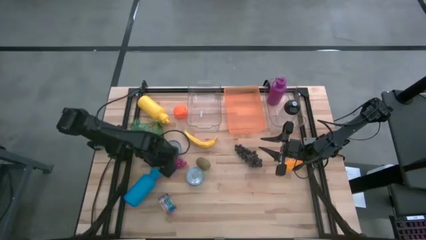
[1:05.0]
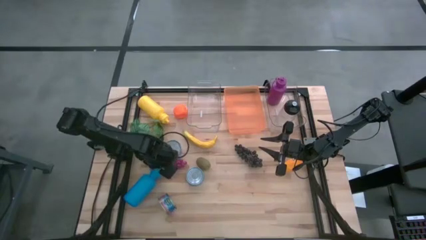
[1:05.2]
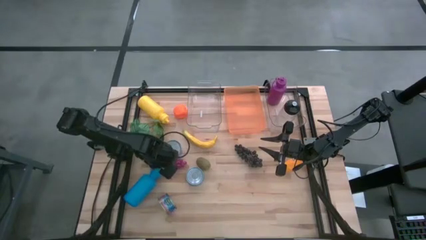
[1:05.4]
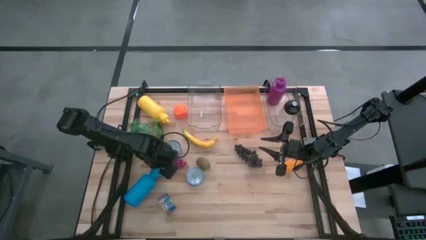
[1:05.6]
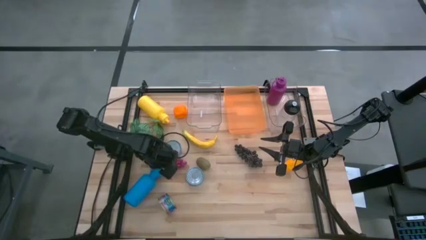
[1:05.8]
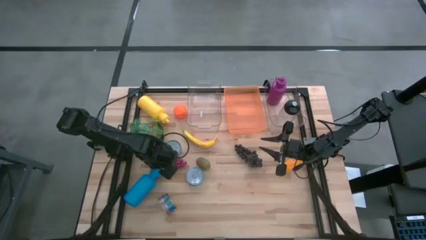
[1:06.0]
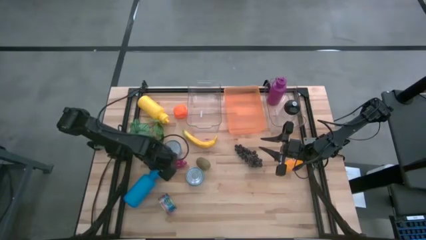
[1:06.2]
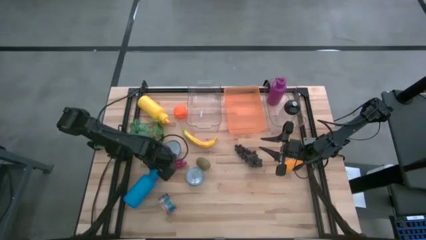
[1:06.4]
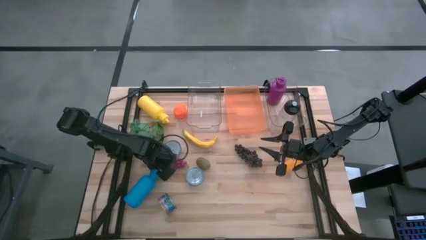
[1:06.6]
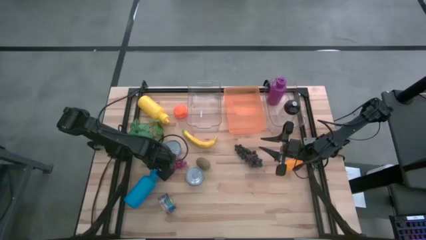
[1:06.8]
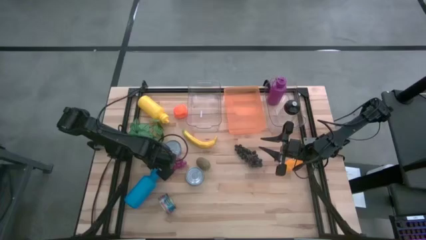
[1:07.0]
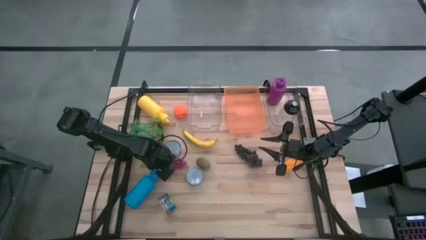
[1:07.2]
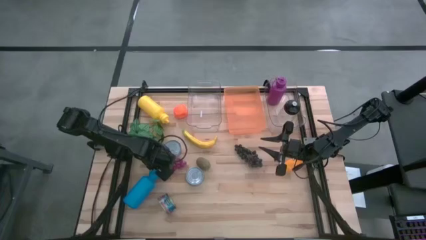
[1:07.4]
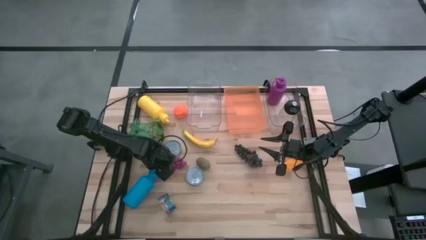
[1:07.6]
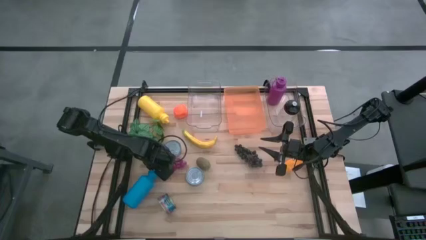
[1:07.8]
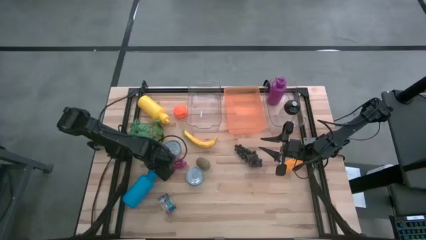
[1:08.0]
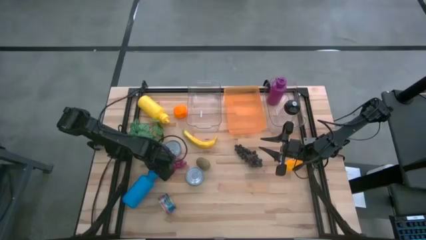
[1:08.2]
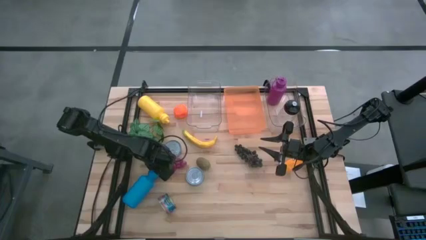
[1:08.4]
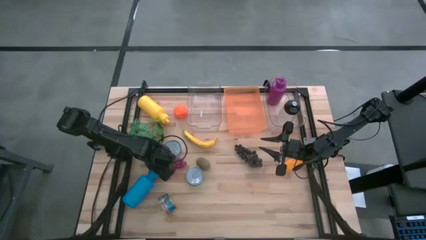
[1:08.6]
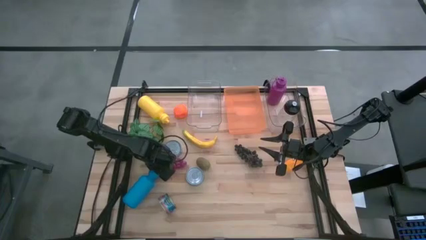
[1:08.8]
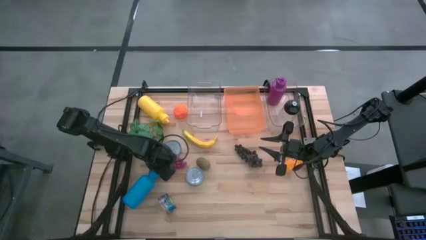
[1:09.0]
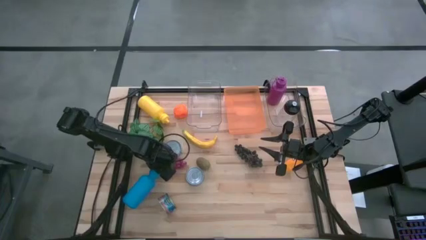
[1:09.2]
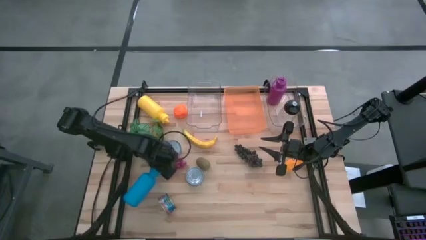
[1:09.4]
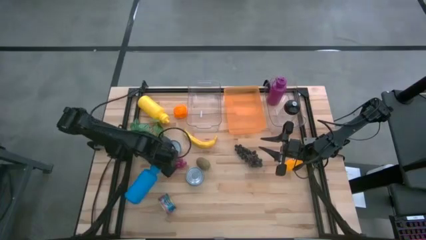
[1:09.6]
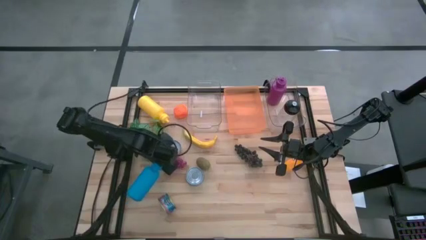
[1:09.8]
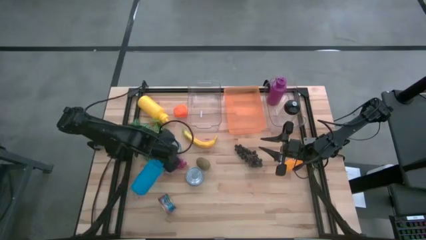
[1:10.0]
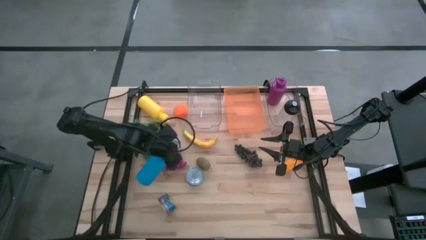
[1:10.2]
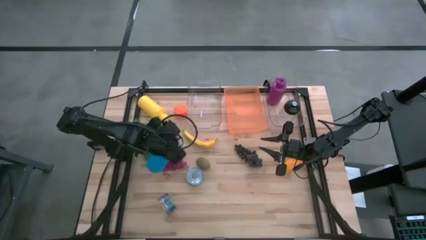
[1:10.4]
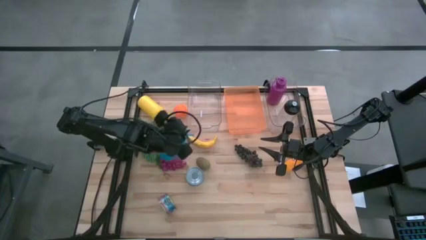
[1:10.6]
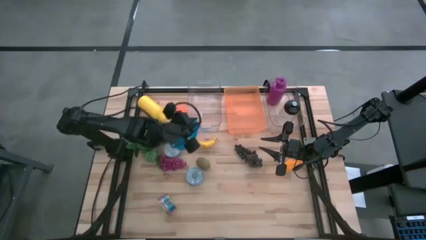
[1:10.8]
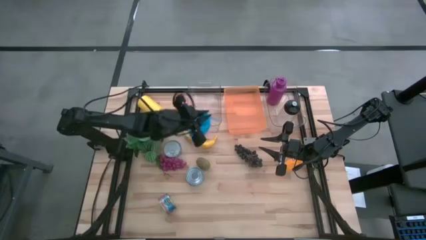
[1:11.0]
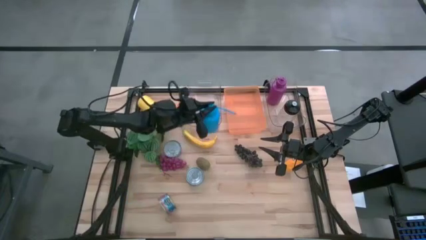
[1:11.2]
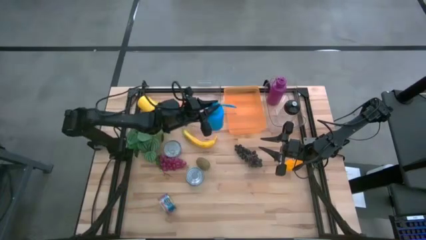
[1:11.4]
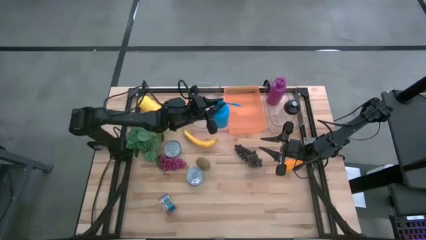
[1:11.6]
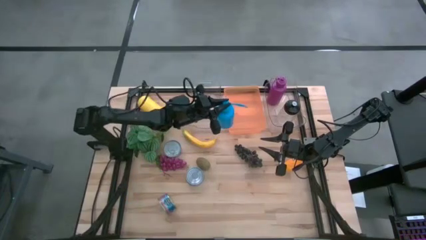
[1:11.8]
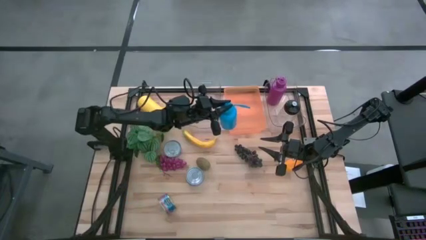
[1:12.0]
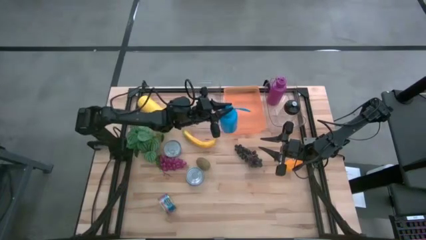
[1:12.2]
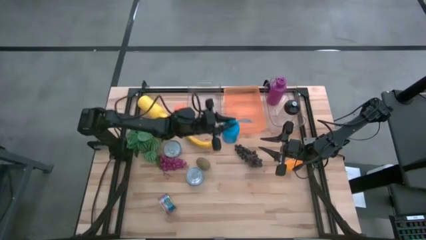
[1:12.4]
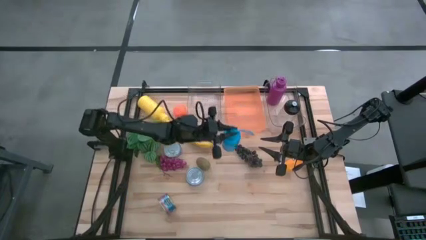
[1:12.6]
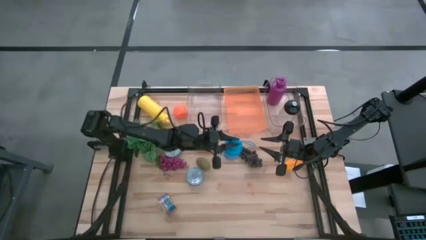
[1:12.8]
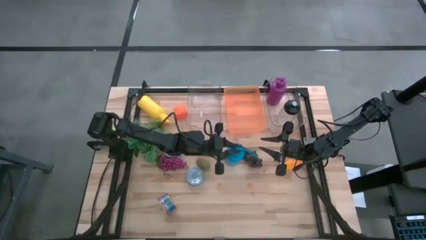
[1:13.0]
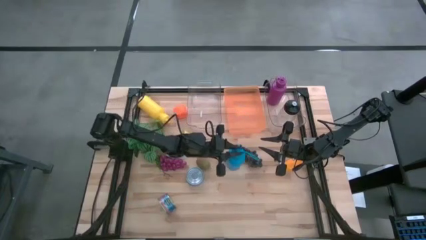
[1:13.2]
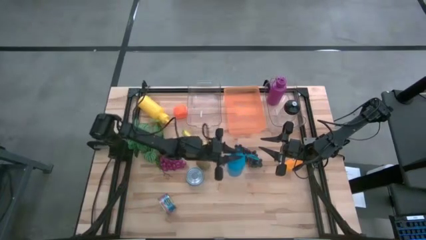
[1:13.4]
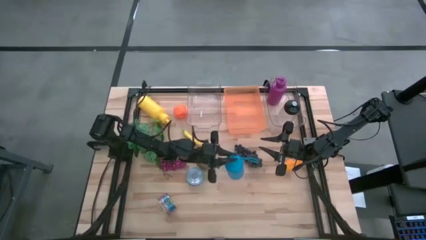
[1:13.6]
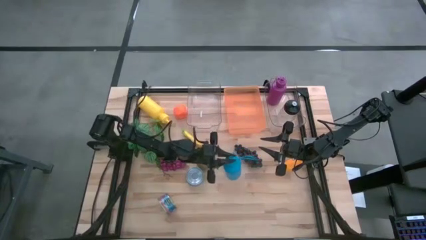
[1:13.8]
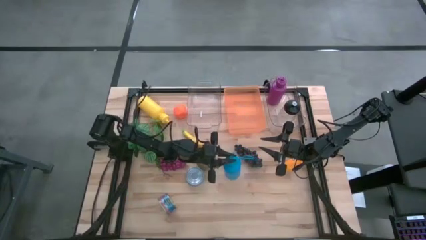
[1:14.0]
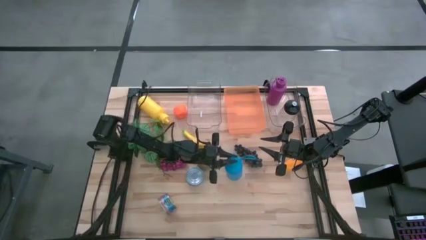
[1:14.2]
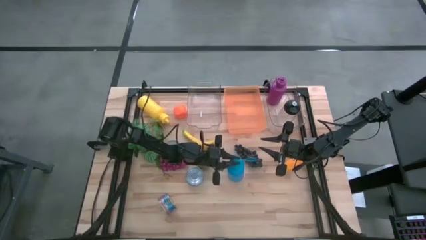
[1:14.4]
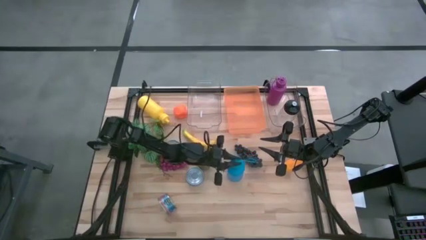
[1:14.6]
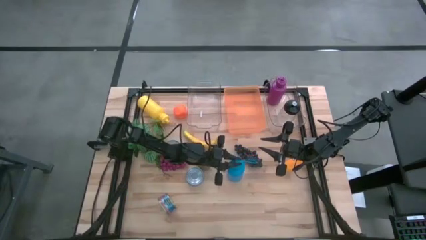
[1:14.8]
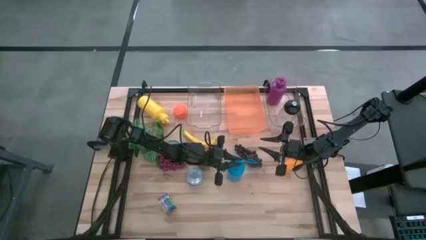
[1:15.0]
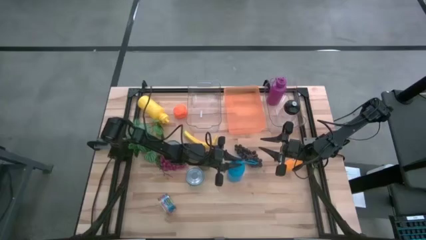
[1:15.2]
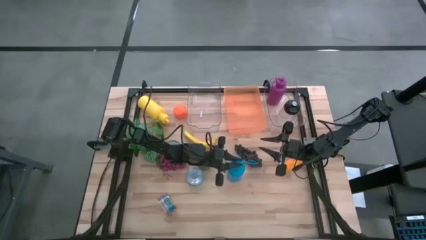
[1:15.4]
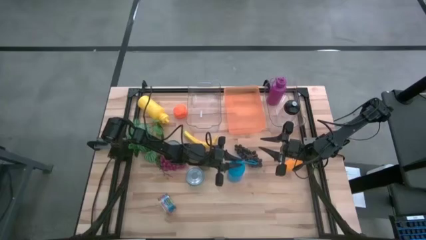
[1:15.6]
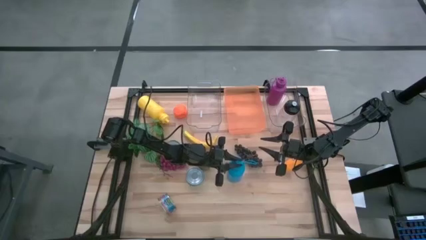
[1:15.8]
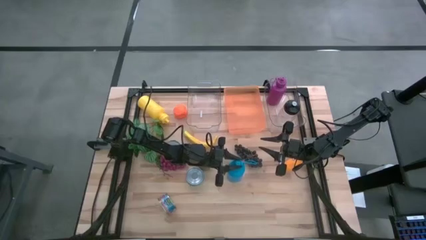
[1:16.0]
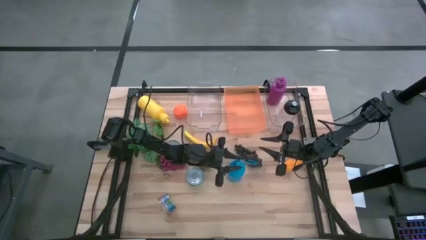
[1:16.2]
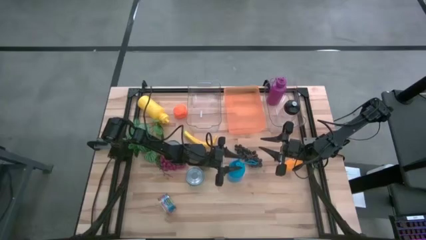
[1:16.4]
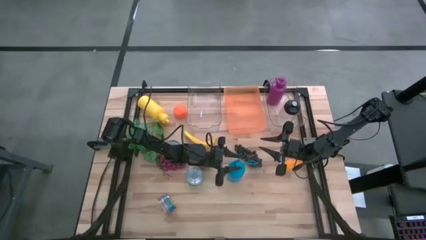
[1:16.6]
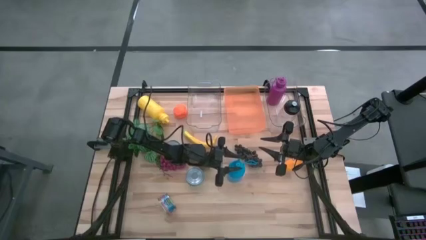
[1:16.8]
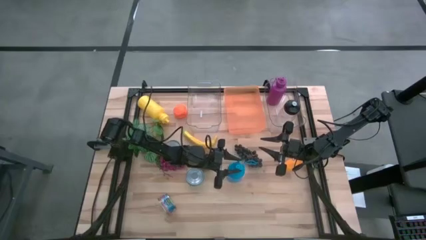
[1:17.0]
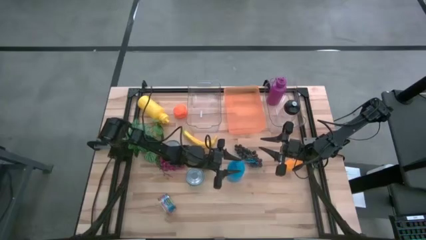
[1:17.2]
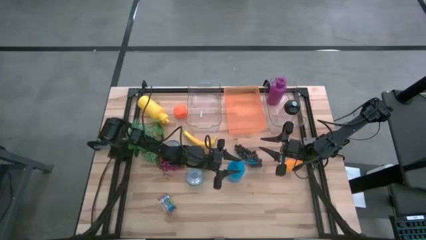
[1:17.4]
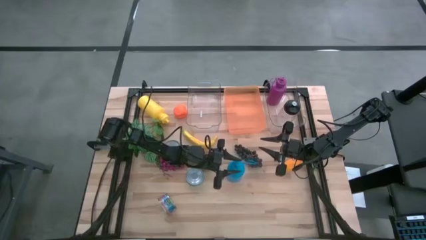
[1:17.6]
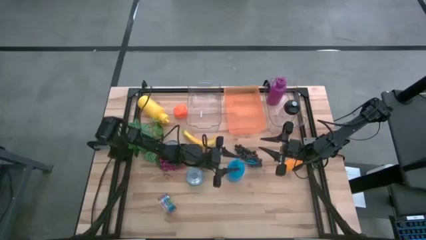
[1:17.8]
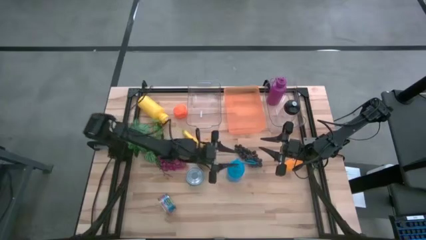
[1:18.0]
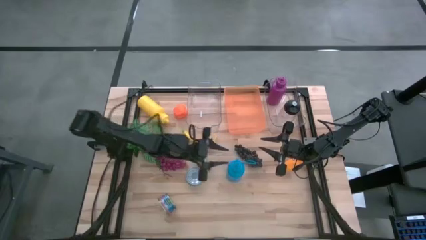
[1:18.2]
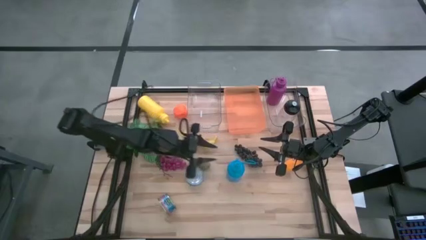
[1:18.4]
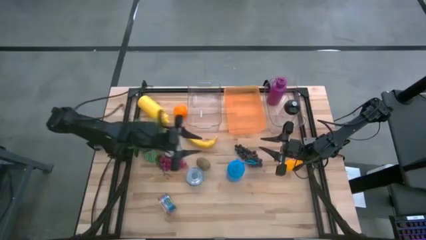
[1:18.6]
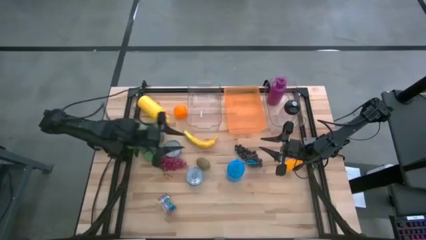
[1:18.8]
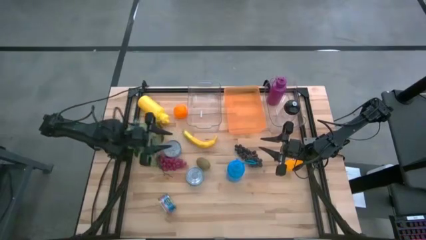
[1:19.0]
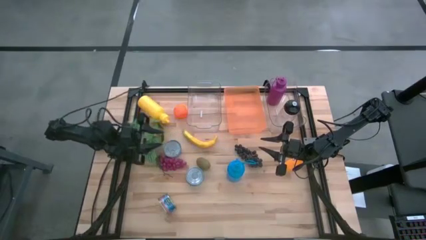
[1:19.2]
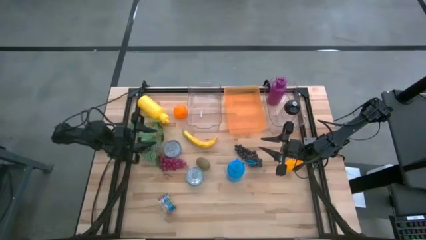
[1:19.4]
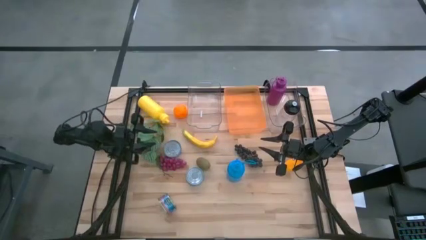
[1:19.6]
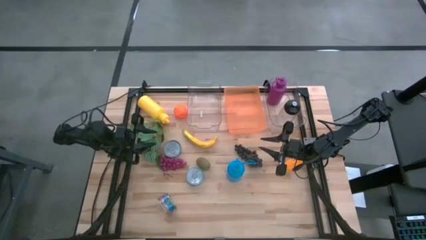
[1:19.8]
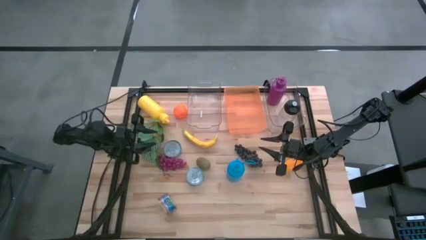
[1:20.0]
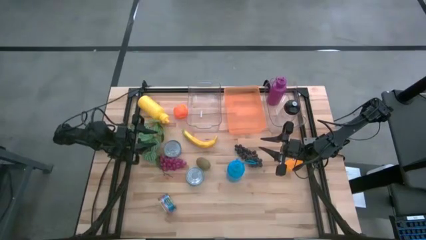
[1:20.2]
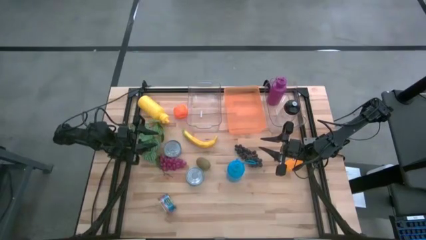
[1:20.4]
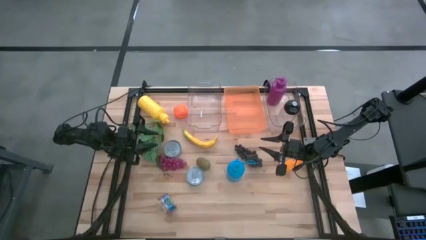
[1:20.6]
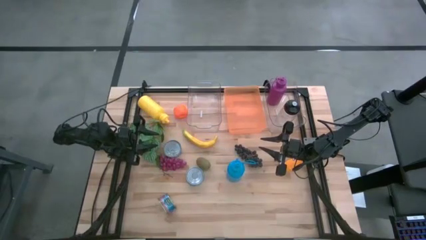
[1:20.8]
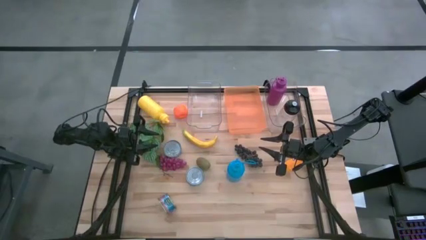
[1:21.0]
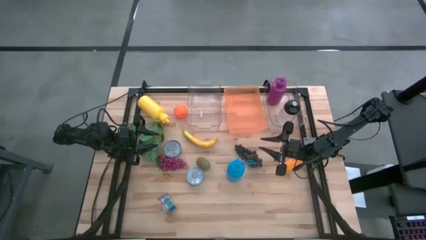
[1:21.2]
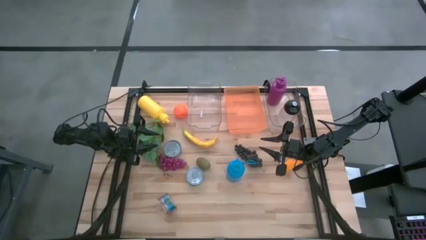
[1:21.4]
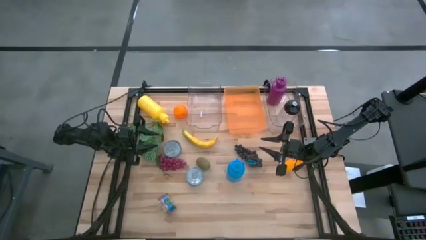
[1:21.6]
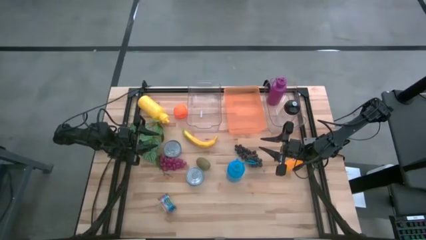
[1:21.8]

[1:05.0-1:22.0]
Task: Pick & Place Food Item
Put the blue water bottle into the right transparent bin
